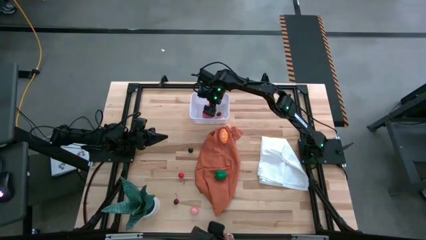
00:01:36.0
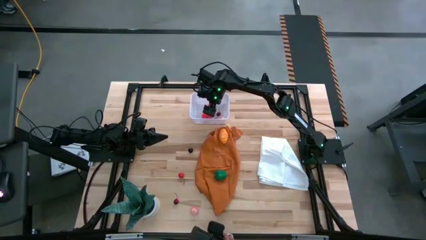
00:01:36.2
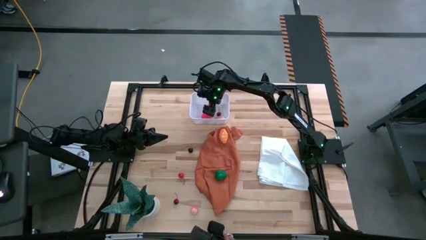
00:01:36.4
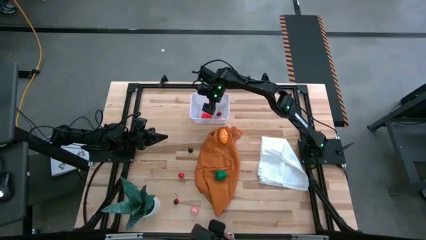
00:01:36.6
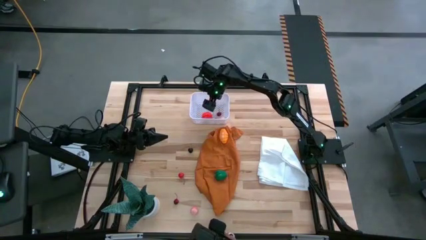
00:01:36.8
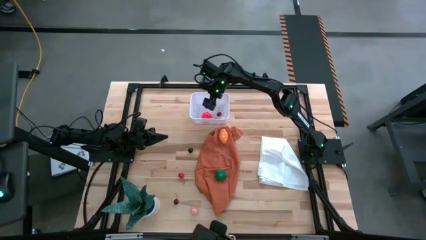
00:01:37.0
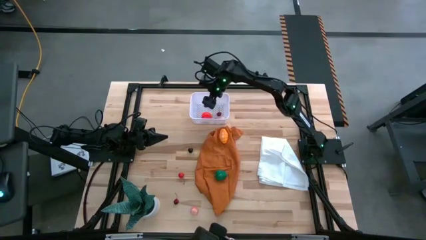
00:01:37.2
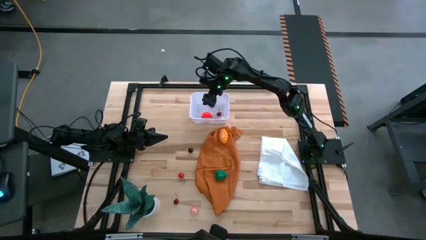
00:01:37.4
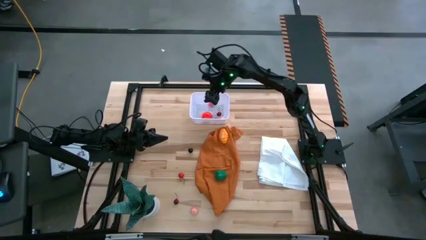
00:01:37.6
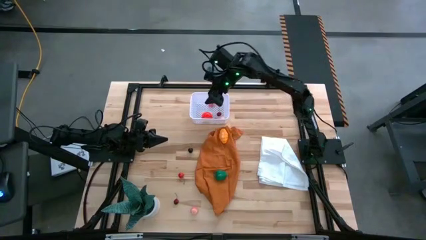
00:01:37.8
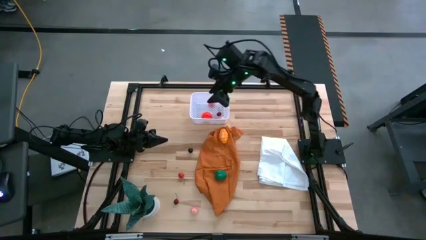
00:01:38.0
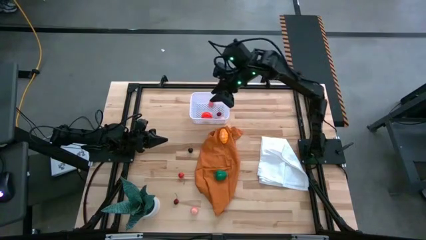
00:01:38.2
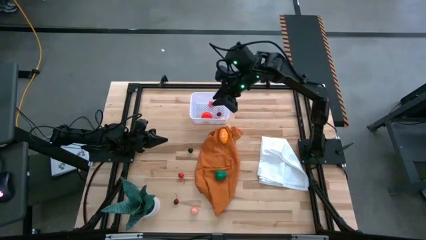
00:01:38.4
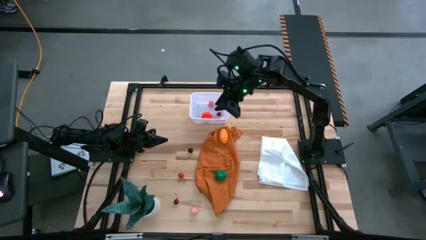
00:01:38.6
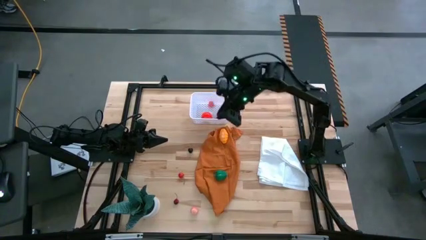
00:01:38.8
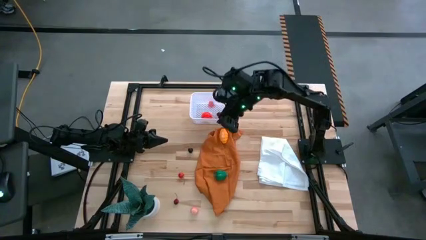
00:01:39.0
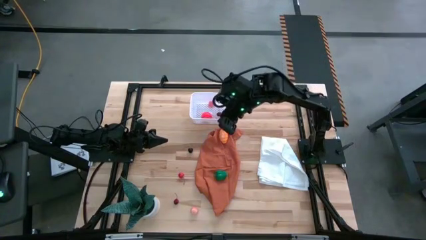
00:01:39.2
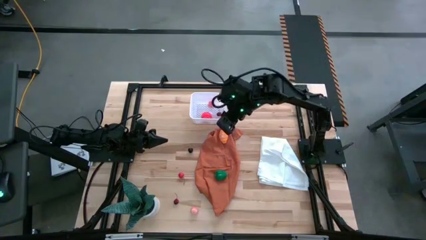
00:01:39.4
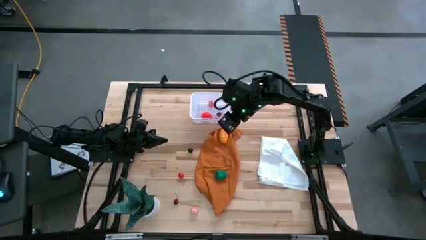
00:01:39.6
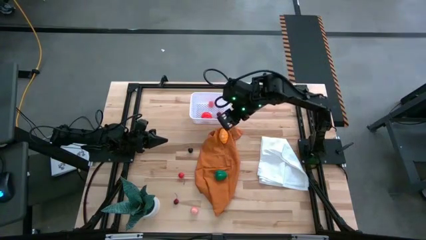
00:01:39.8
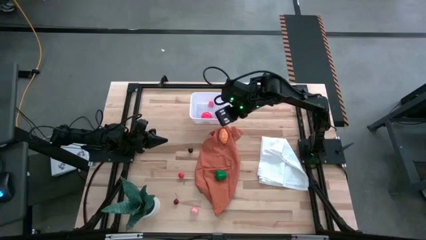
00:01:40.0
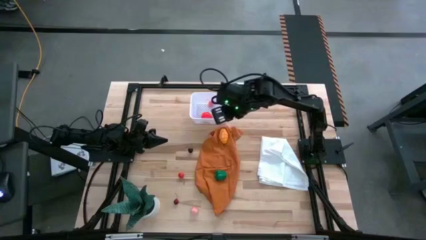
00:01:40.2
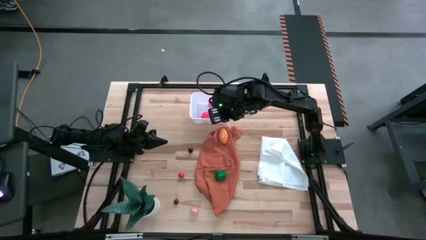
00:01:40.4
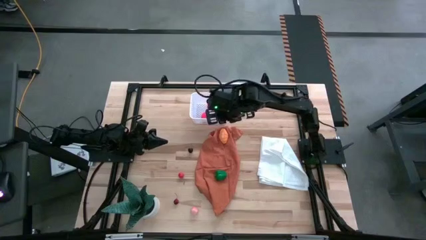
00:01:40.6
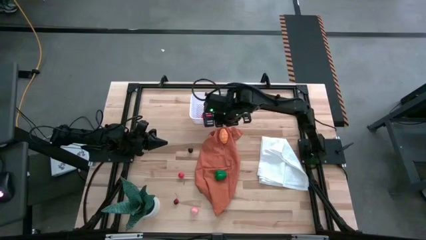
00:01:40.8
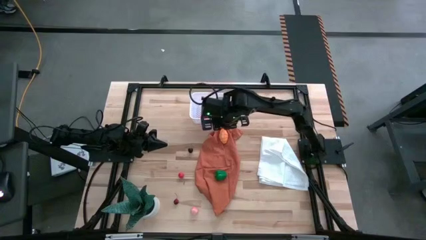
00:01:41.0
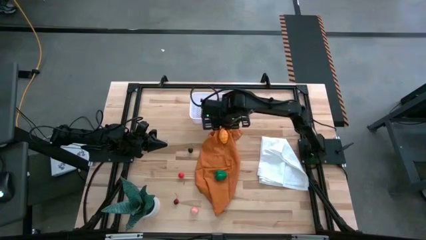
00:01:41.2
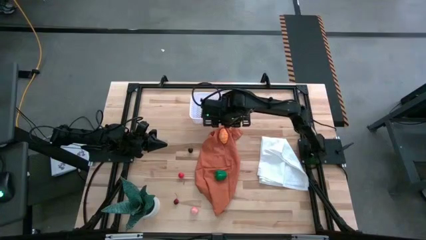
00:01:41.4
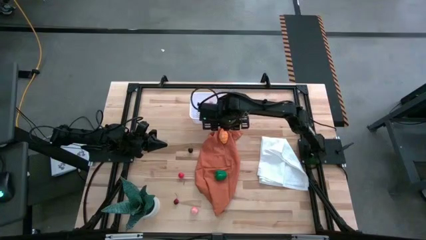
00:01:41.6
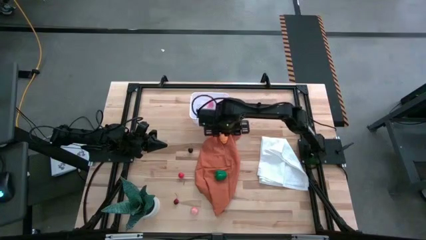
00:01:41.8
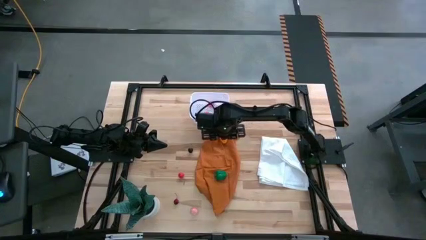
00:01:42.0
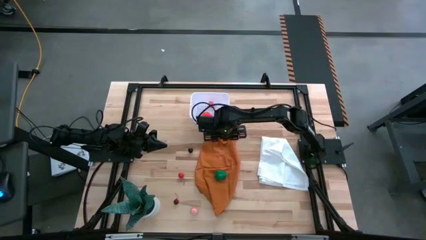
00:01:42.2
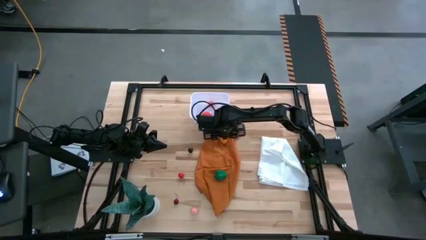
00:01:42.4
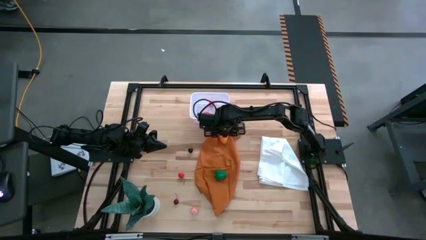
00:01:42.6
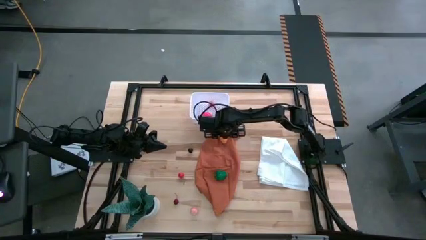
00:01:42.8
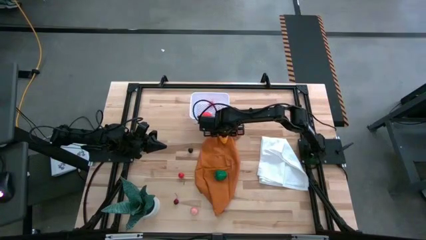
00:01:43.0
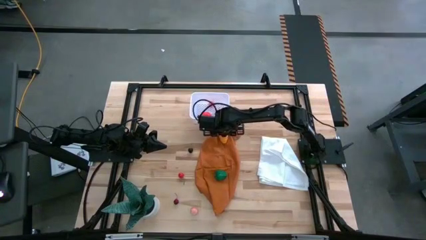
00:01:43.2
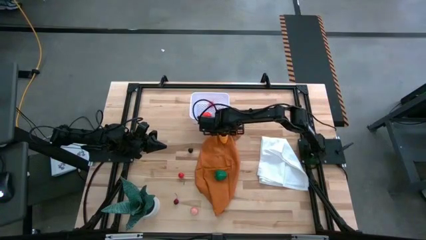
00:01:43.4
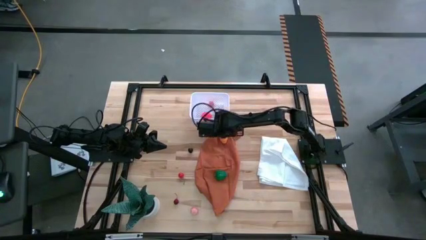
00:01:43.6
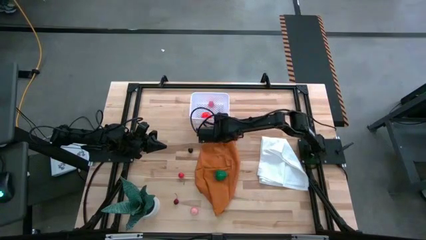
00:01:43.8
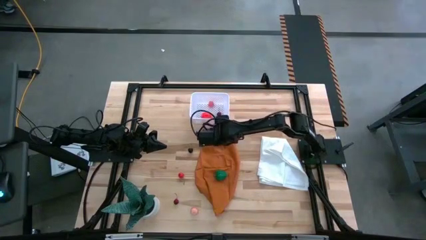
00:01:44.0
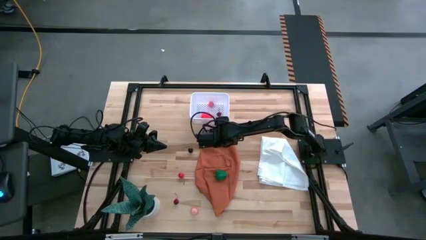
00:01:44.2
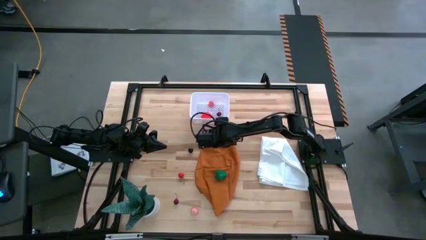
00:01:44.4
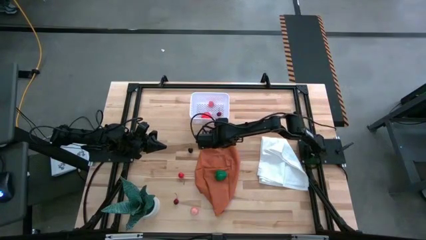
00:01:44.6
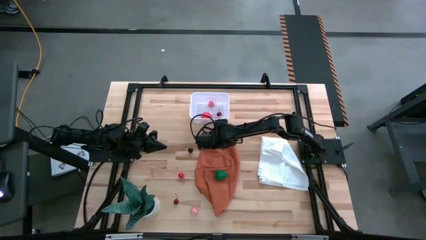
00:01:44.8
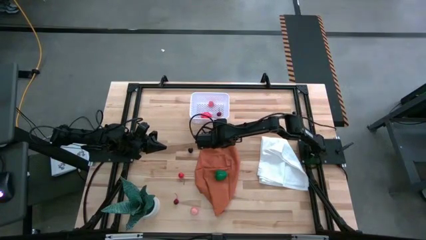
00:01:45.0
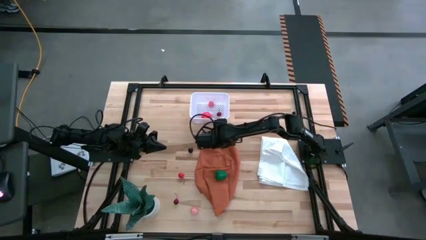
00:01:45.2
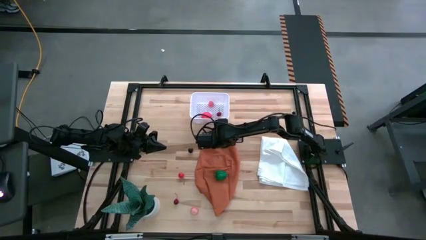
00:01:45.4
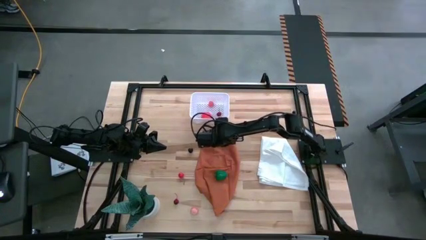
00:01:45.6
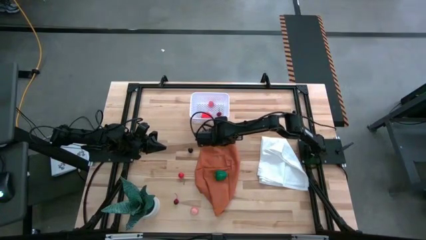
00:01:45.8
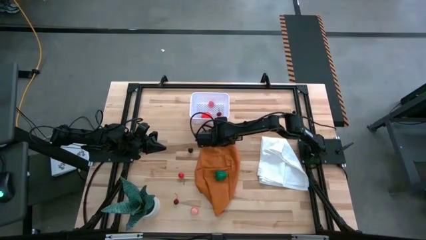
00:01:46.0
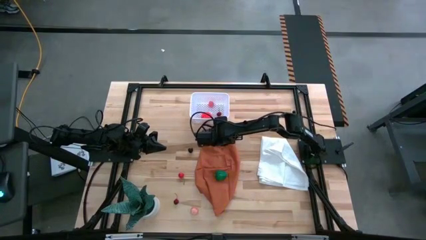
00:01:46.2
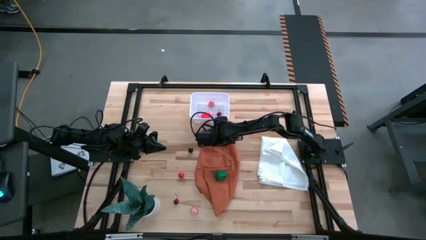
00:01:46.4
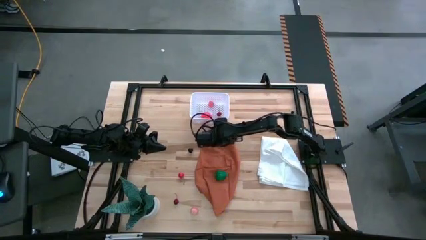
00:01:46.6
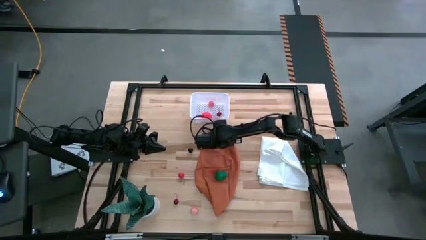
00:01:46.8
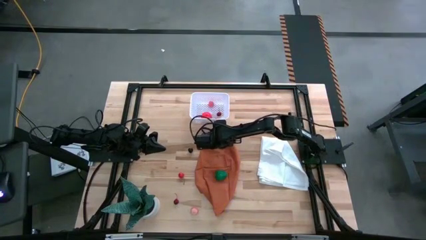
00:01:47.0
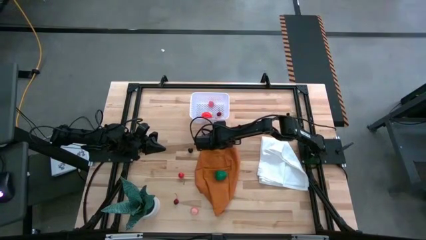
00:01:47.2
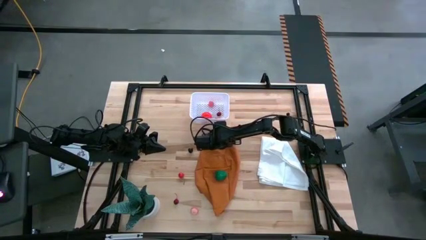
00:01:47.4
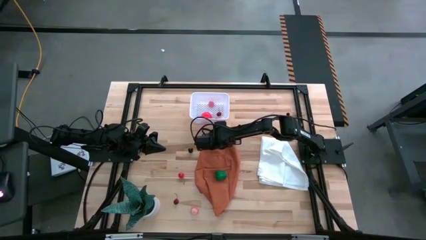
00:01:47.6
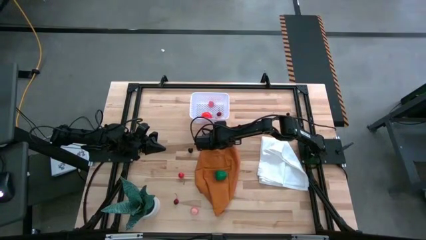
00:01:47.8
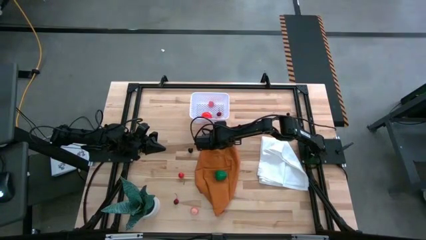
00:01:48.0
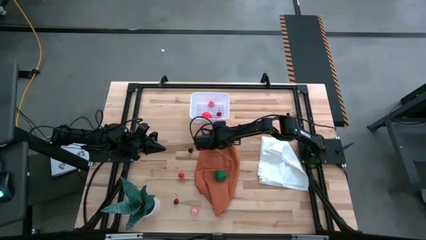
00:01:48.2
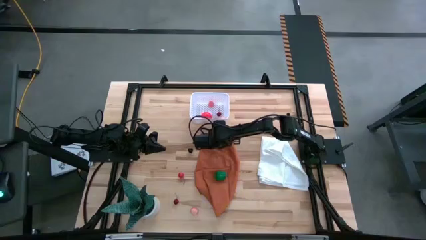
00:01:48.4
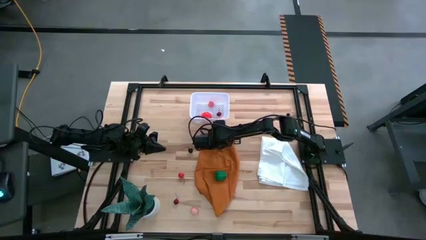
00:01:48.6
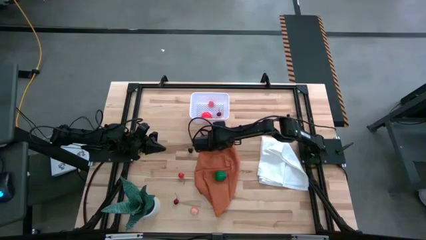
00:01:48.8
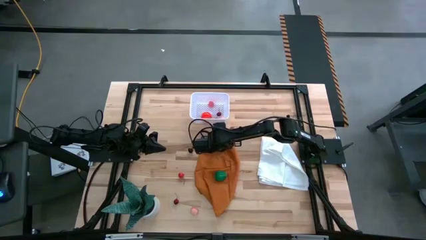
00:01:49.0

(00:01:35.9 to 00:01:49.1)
Task: Pick and placing Produce into tupperware
Put the orange croissant into the white basket
